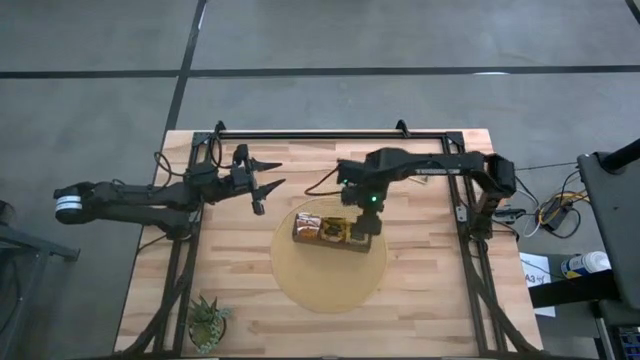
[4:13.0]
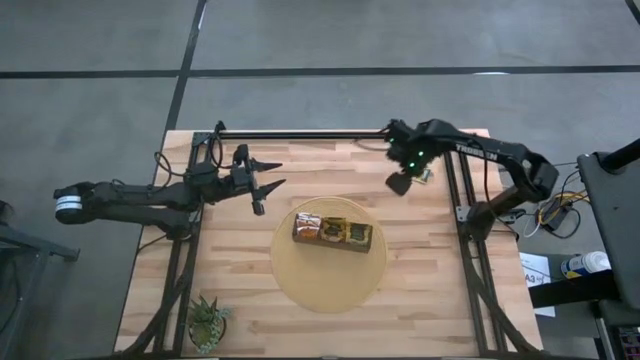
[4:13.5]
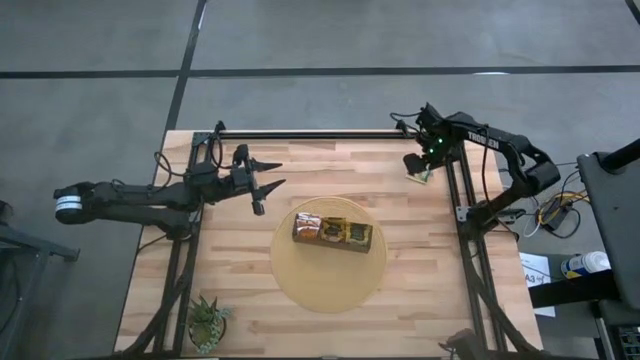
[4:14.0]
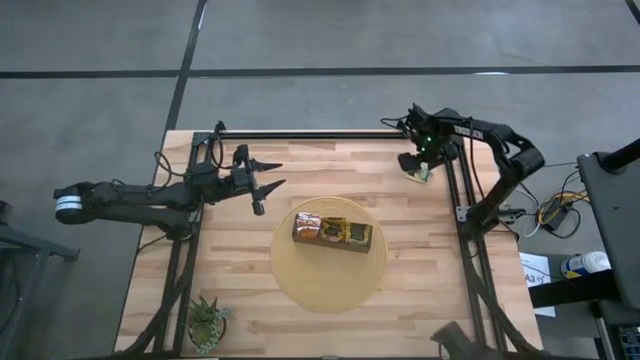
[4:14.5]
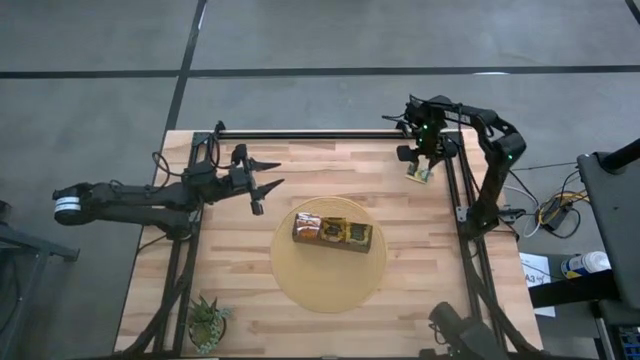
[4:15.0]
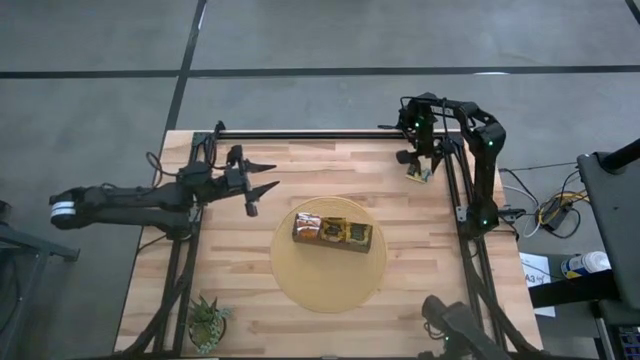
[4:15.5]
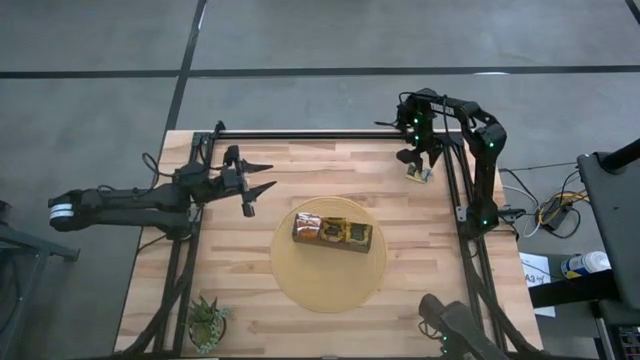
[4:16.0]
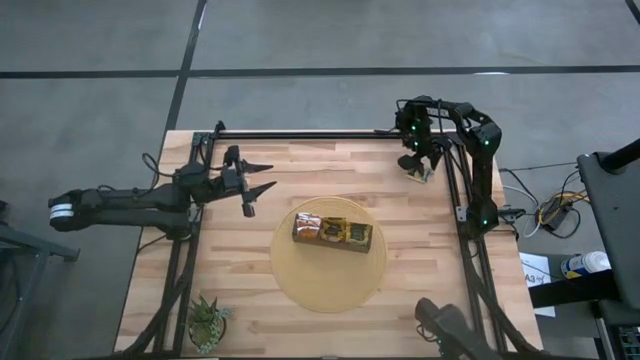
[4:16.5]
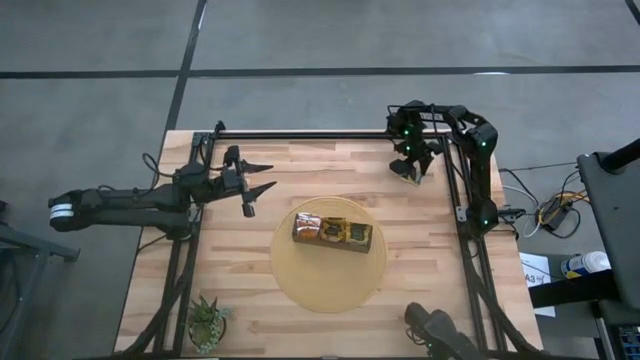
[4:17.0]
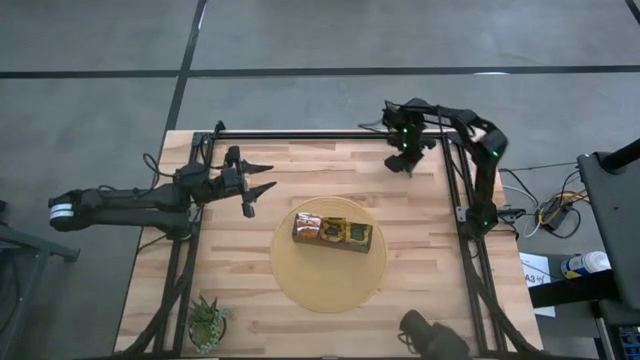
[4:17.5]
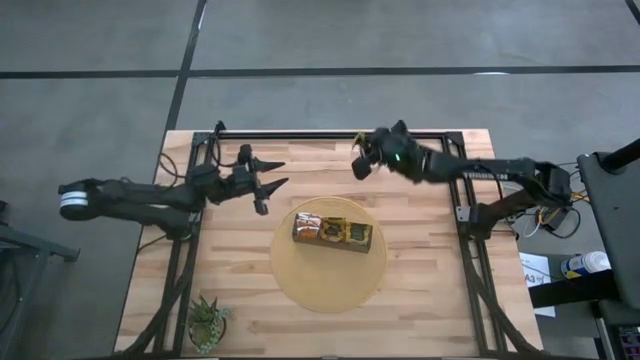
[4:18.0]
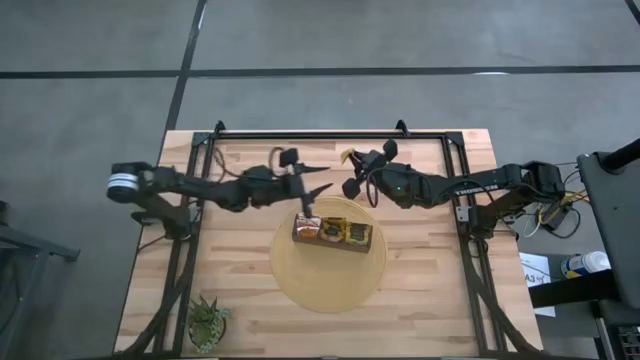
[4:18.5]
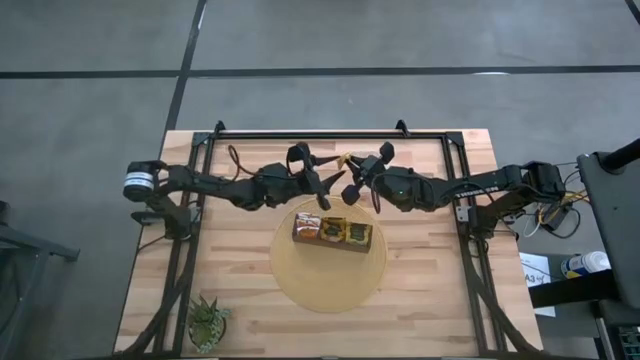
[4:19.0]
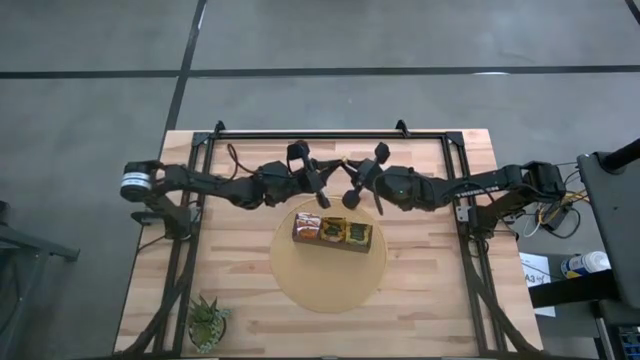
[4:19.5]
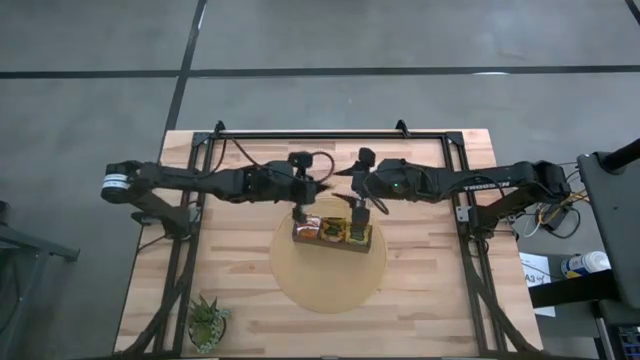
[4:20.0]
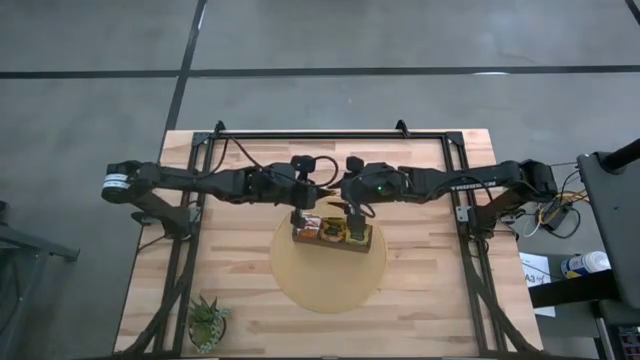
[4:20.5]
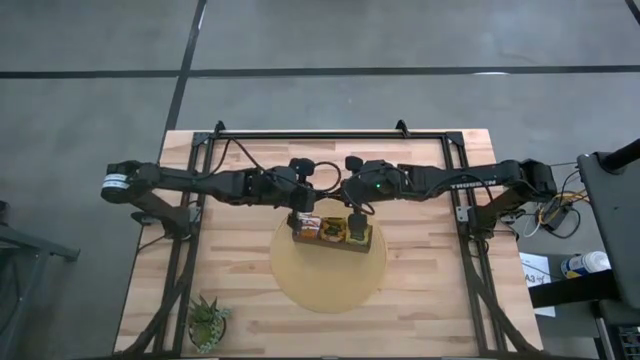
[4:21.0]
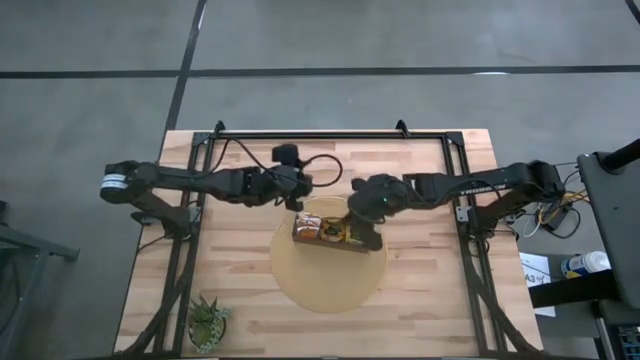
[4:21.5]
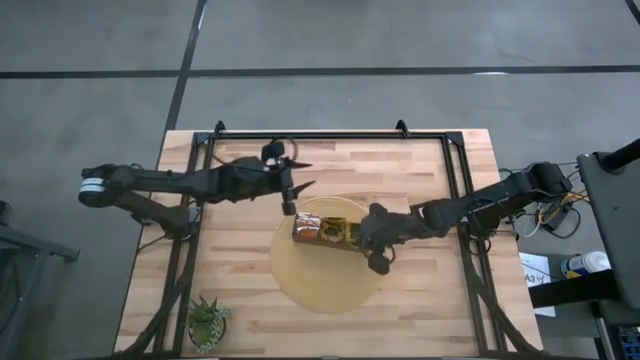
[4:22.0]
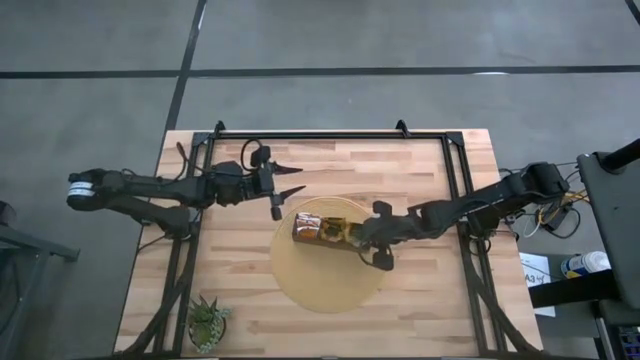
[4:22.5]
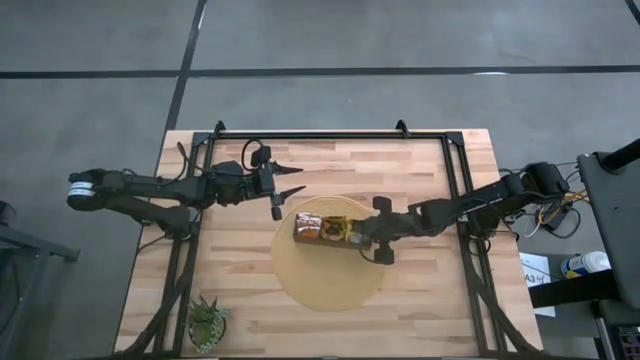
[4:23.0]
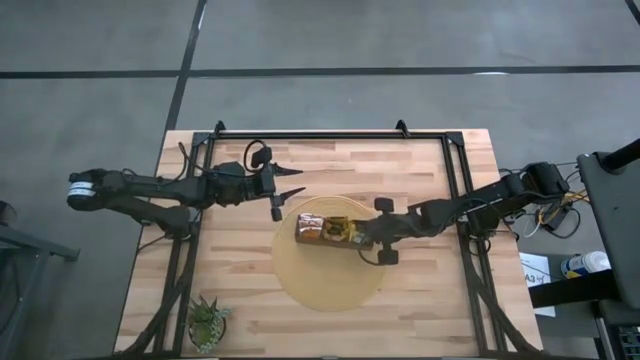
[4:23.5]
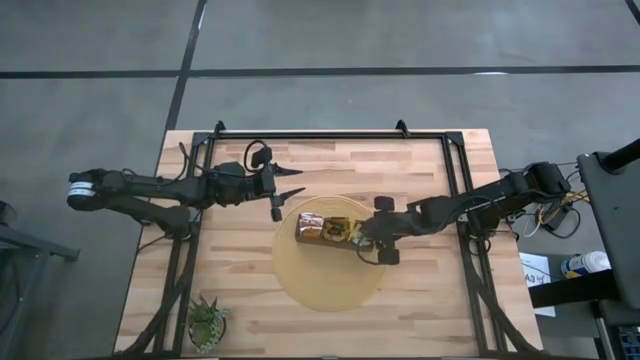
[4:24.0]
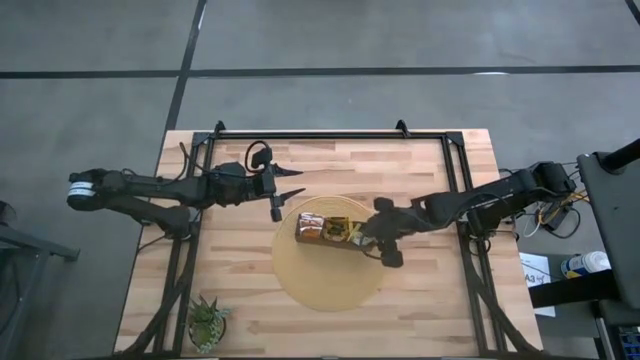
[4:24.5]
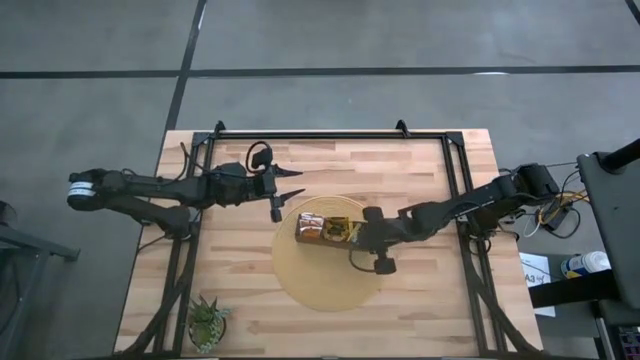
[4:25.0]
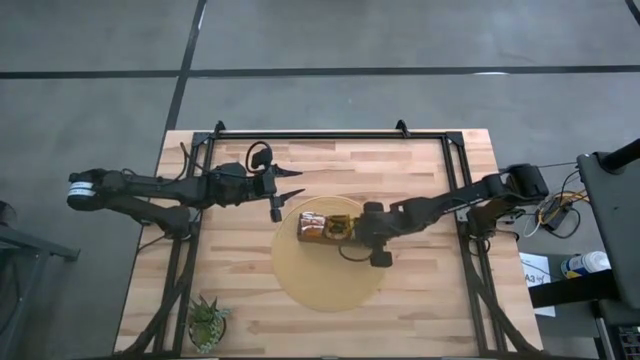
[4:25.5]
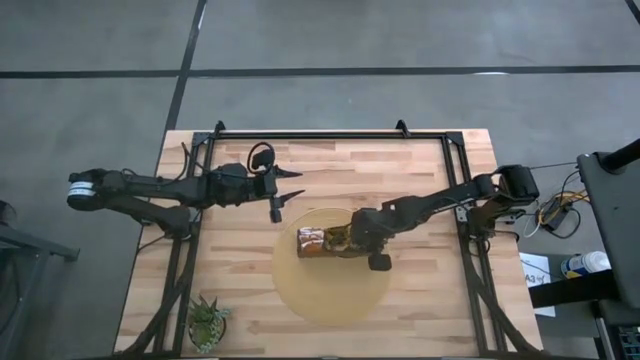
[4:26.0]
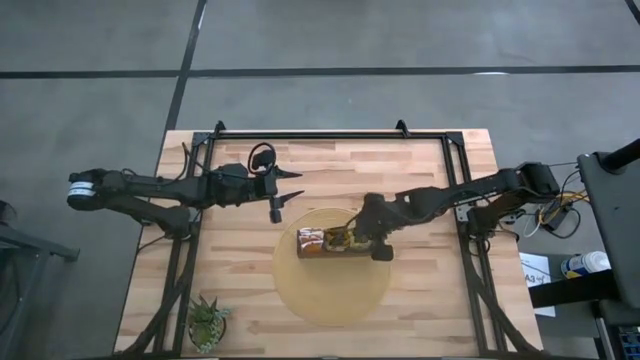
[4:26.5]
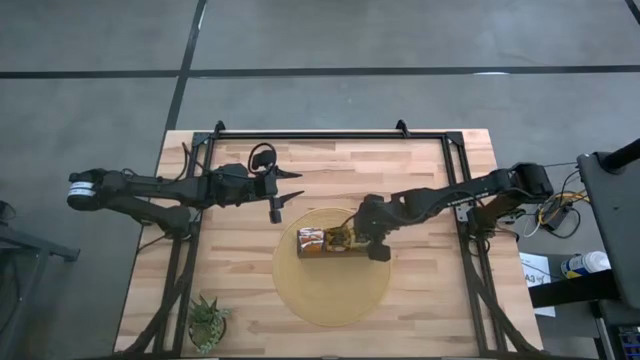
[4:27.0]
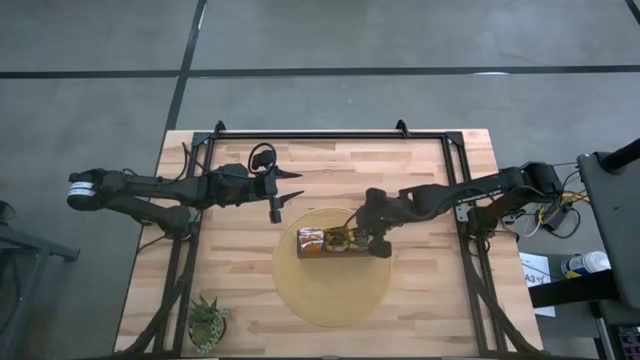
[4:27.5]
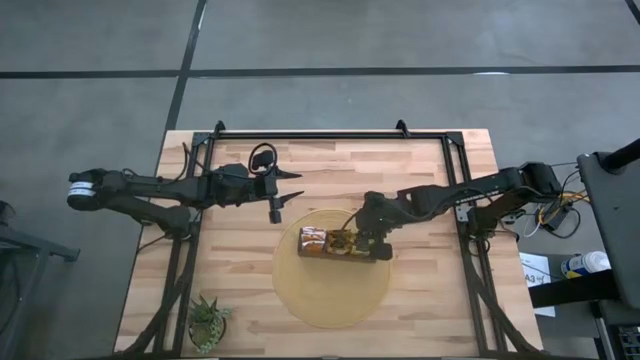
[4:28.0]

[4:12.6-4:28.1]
Task: Pick & Place Tea
Put the yellow tea bag into the right section of the wooden organizer

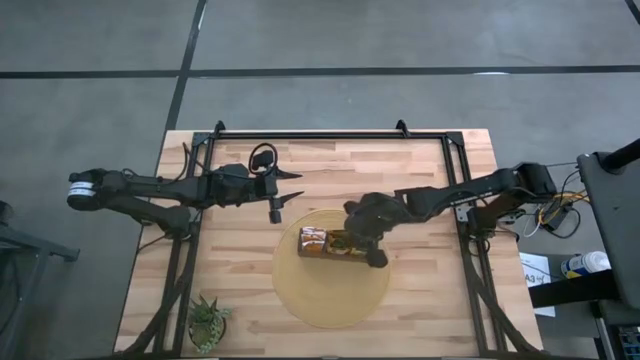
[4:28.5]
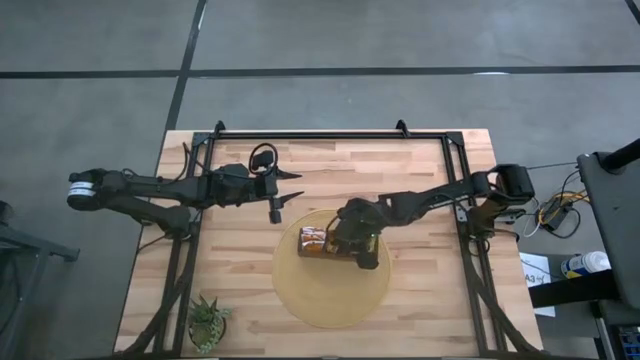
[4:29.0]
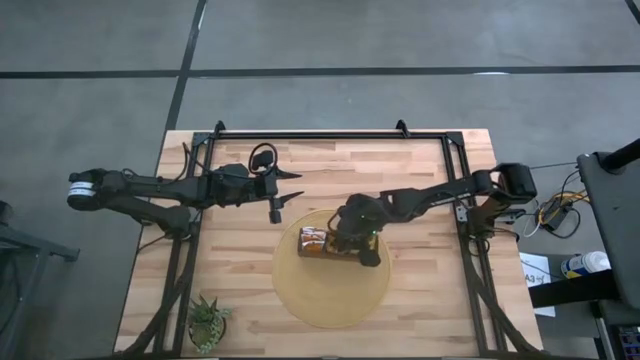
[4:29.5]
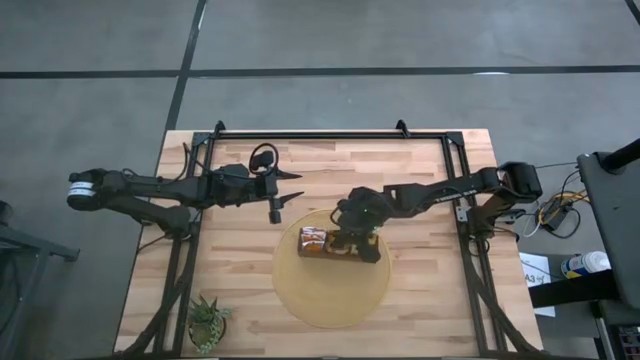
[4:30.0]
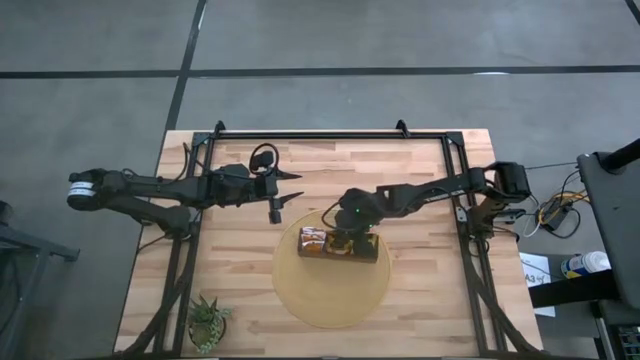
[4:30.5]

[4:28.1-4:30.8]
Adjust the brown tea bags

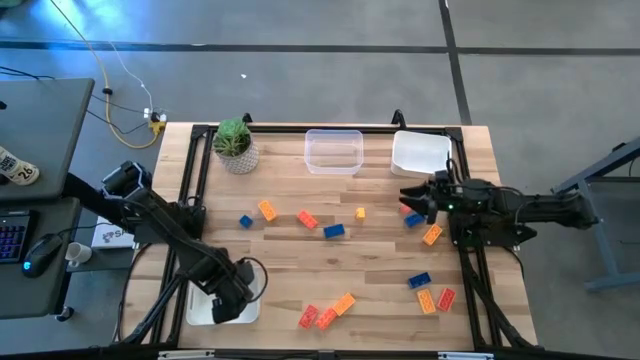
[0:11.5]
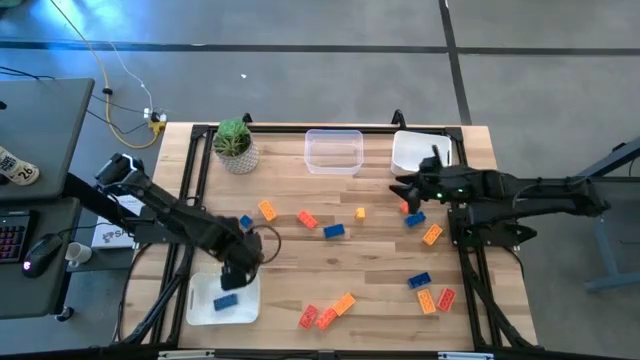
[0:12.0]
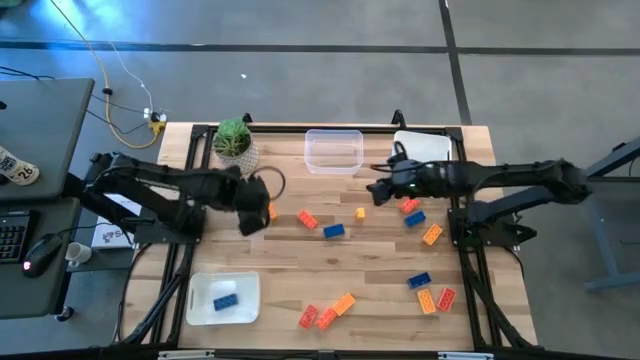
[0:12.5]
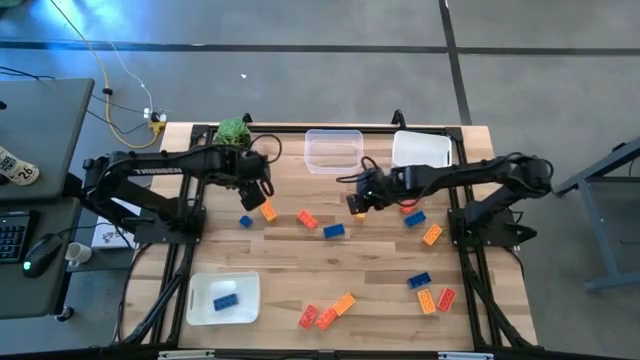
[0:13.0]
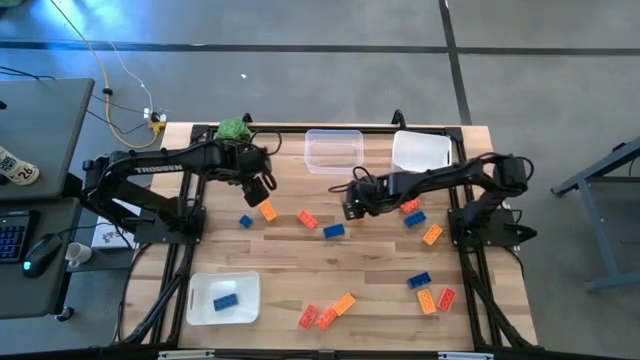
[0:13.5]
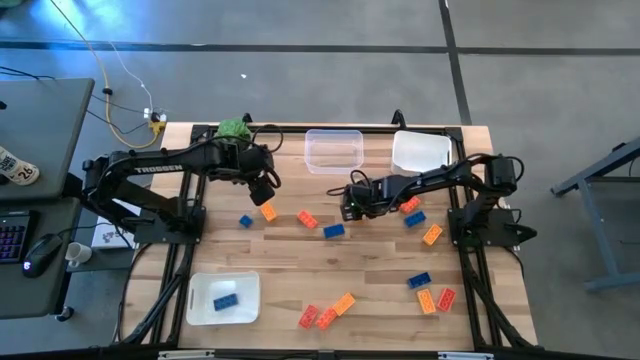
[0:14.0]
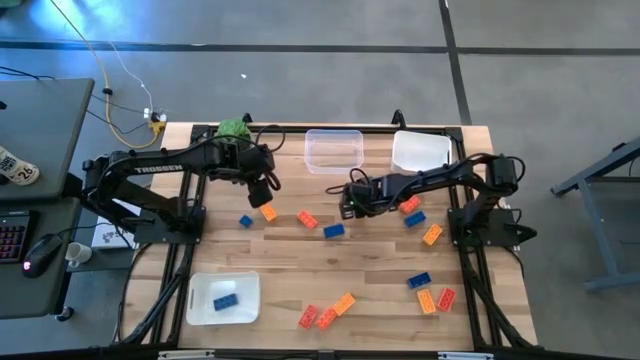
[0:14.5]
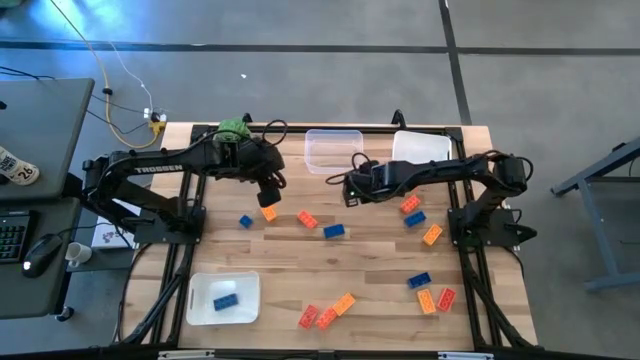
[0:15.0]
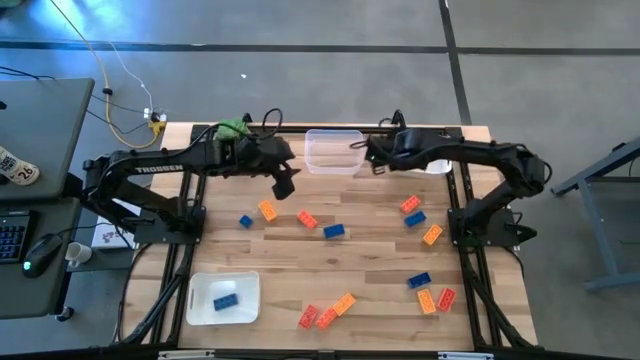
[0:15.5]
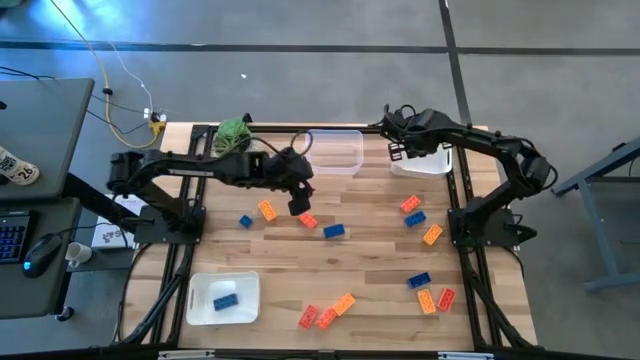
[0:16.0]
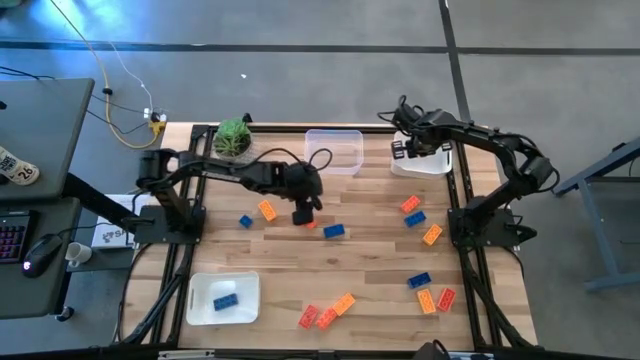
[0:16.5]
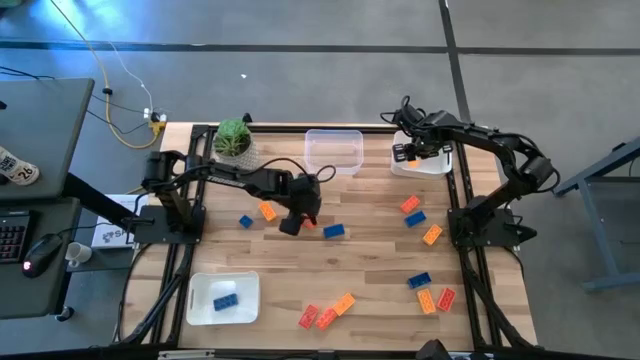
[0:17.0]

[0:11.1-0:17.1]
Task: Sort & place blocks by color
Put the yellow game piece into the top white bin
